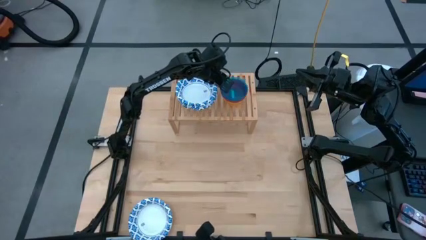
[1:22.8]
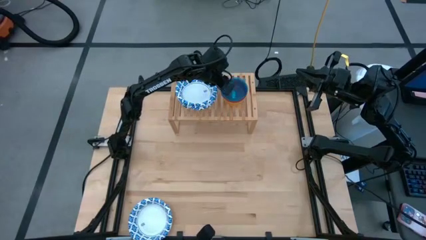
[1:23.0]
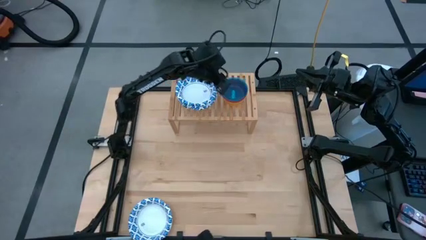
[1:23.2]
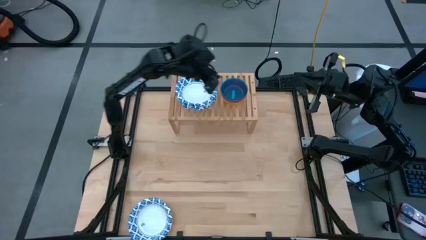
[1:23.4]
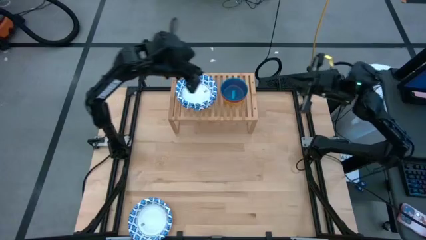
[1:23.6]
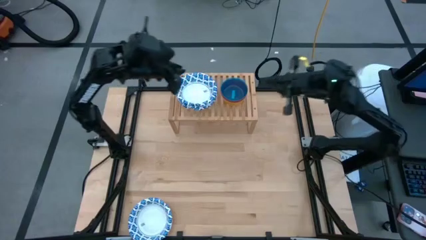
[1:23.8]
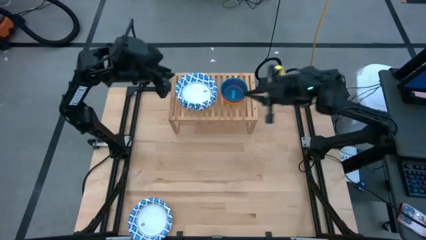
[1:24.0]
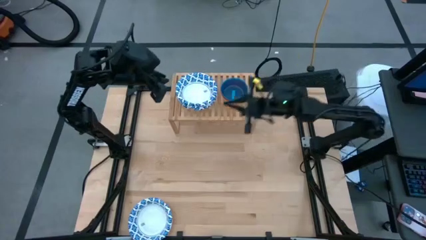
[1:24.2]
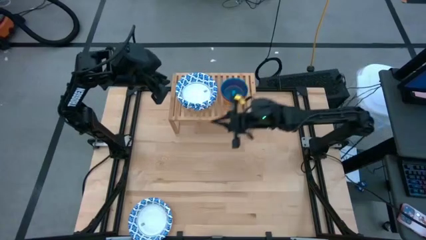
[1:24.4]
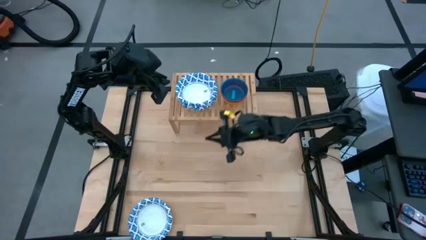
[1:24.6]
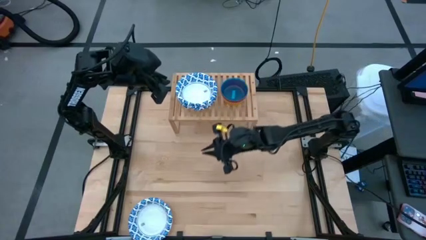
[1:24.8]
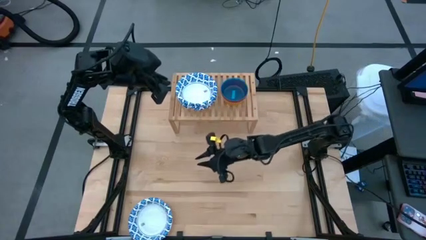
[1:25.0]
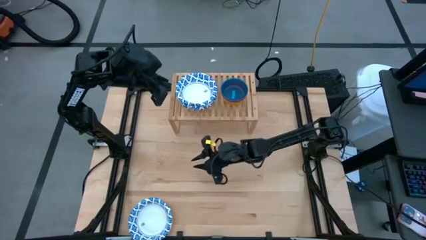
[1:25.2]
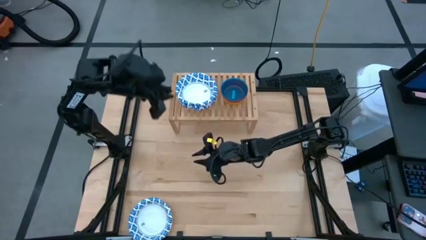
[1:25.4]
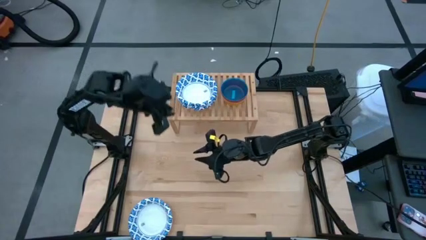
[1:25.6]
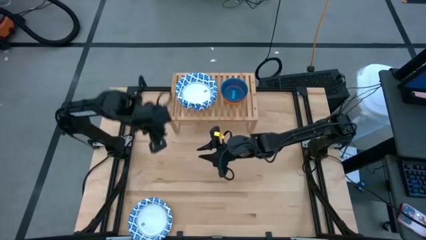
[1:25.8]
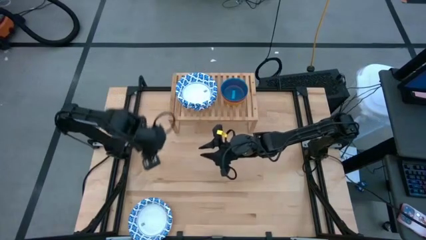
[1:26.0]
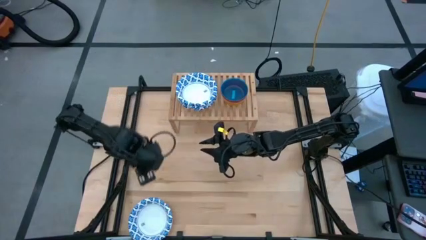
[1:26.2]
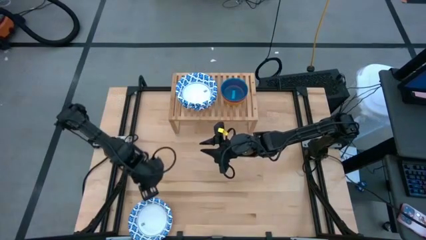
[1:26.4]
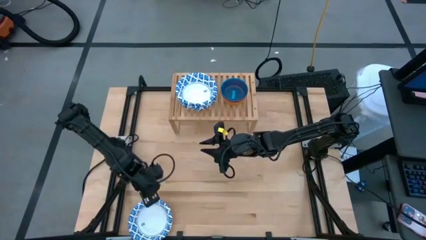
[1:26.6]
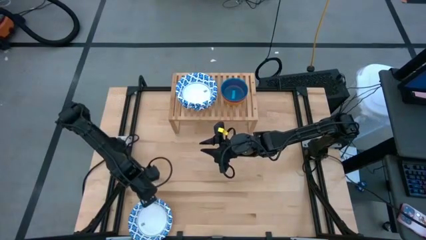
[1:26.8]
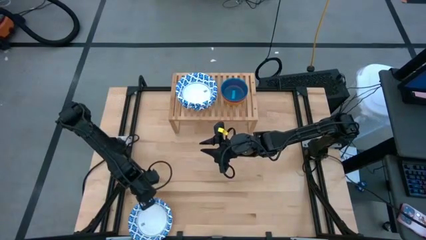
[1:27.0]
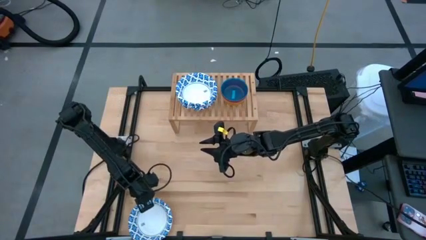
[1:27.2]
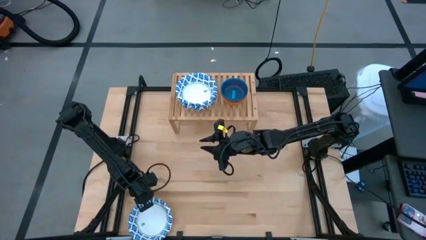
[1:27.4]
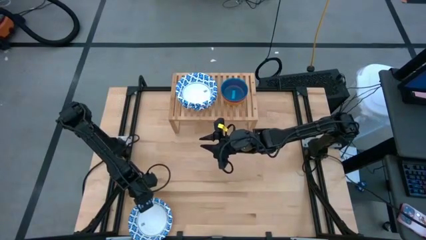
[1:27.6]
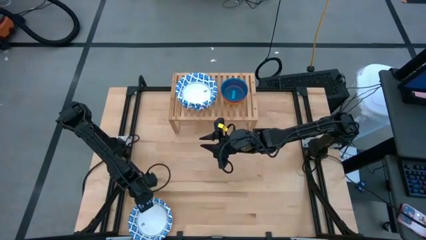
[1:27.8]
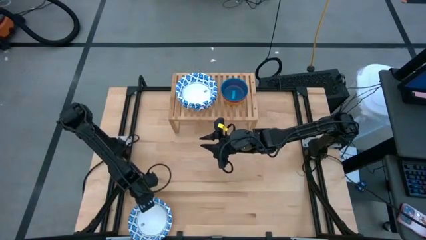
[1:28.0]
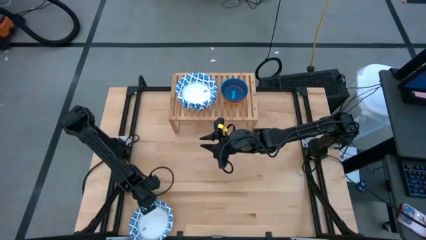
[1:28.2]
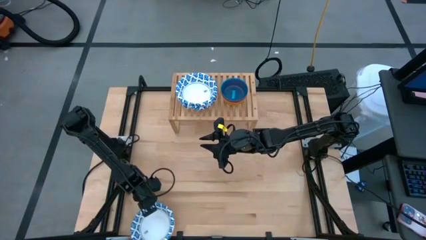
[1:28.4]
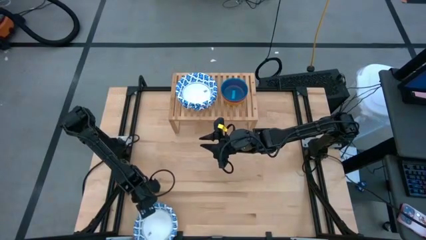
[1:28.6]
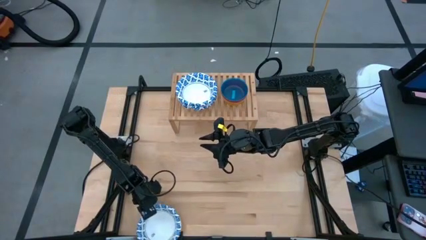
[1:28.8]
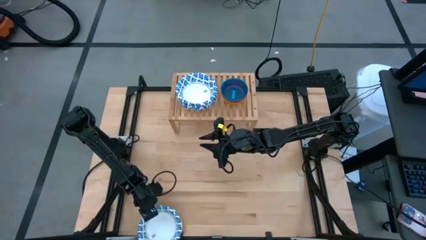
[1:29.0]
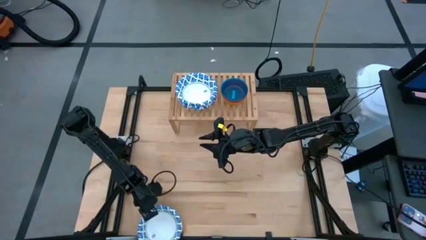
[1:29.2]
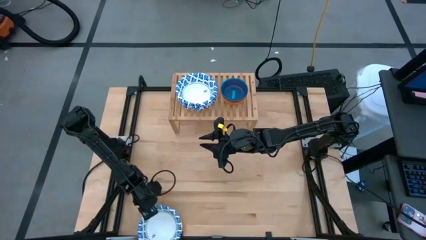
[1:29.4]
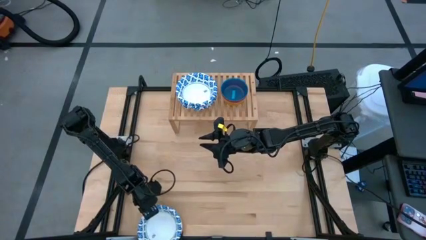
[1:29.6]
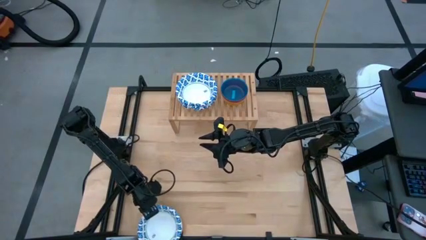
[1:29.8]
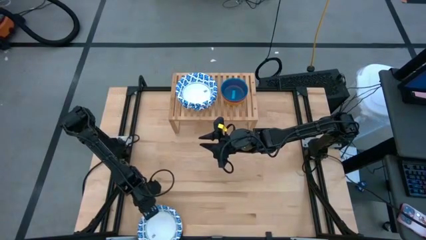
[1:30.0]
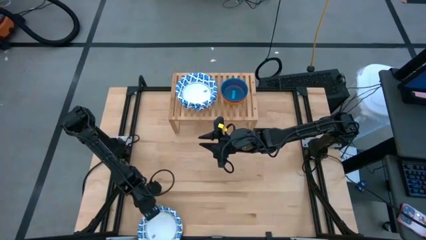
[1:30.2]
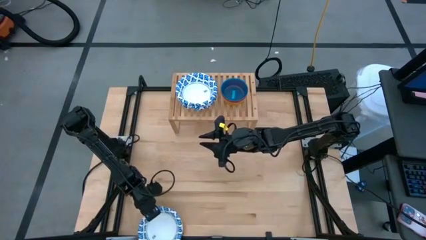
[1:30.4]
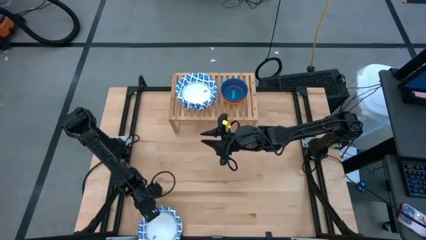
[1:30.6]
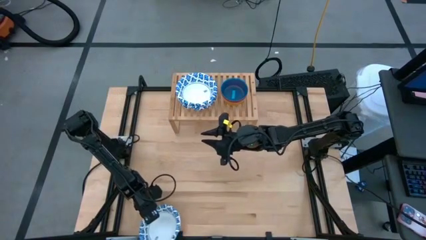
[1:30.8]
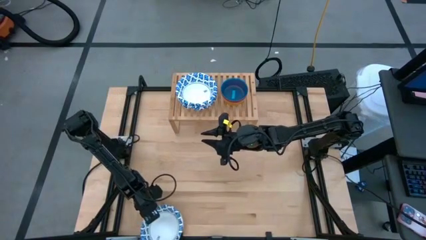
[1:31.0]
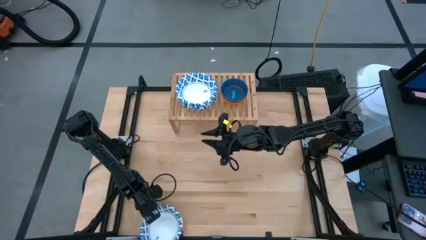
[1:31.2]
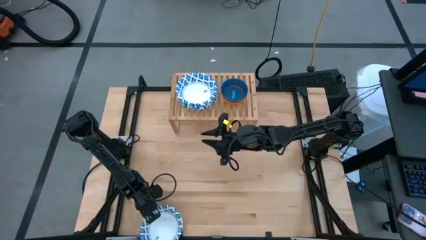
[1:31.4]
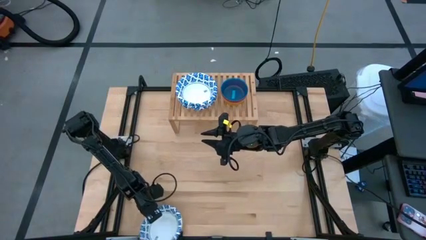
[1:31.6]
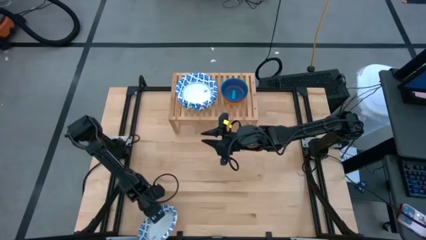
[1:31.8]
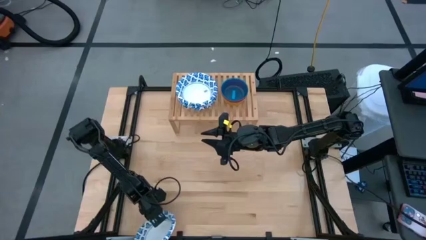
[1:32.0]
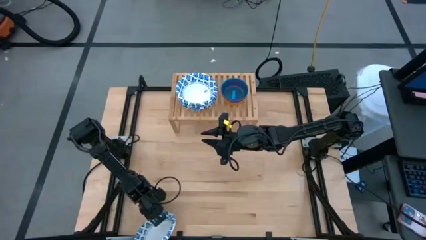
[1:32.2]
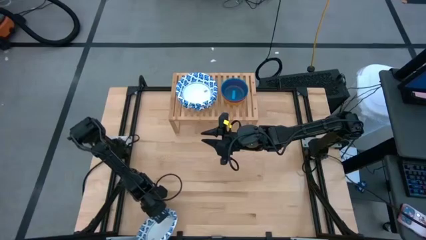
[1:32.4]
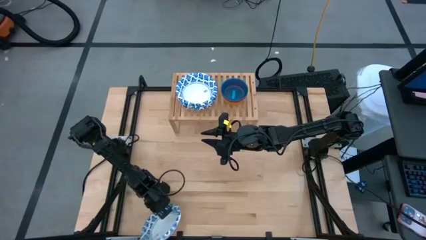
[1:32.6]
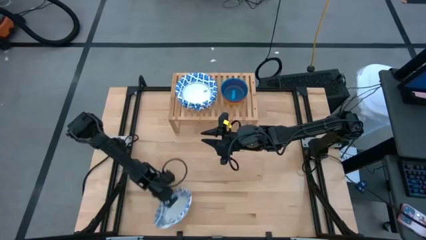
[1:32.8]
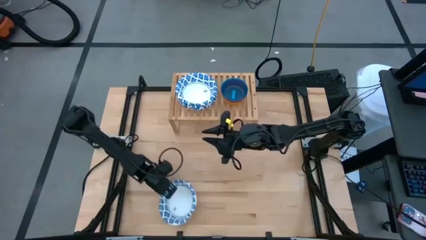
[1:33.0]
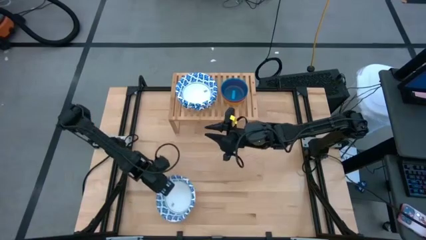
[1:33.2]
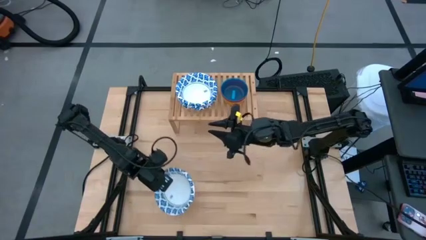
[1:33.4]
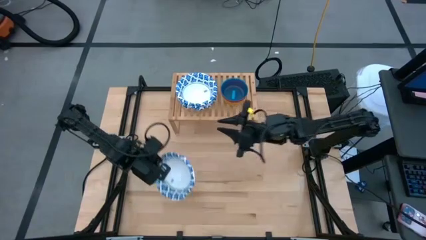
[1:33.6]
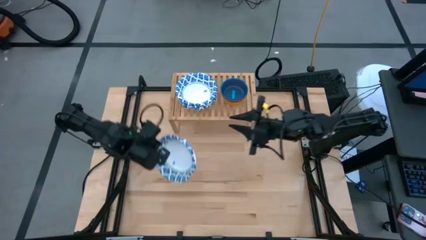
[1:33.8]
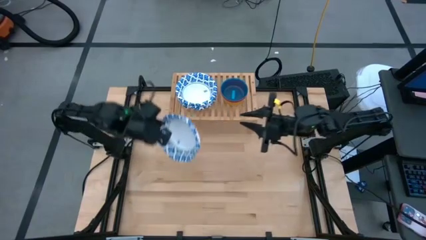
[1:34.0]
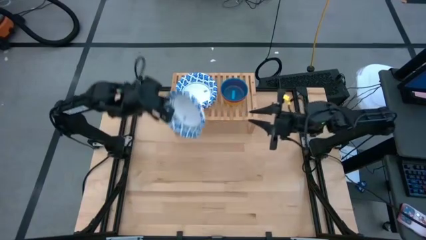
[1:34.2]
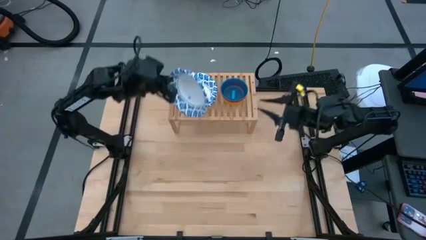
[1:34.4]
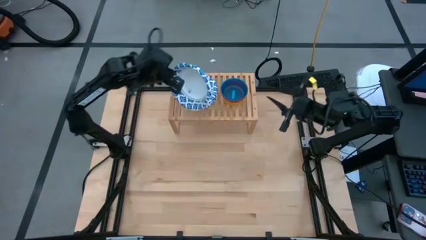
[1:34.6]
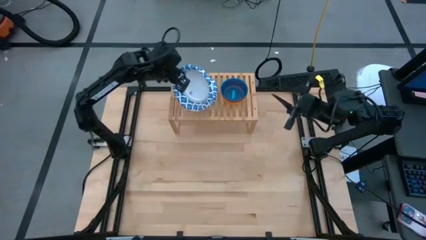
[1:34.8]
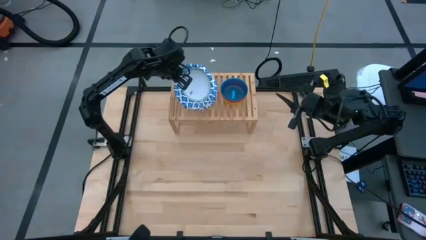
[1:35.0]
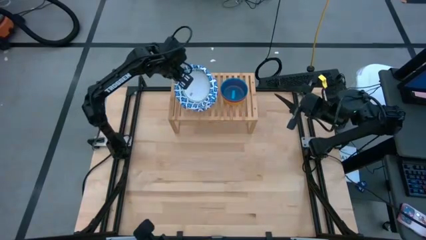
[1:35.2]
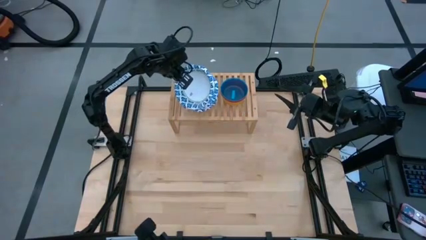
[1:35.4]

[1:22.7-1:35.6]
Task: Place and stack bowls onto a shelf
Stack the white patterned bowl on top of the white patterned bowl on the shelf

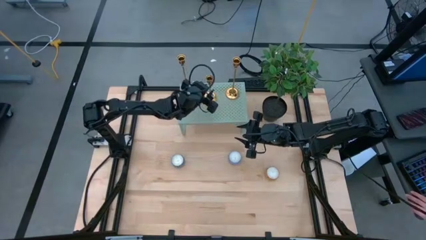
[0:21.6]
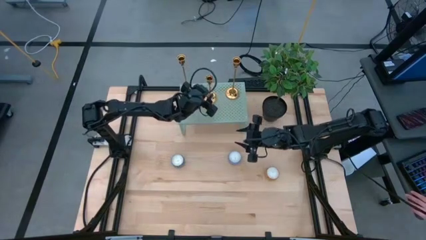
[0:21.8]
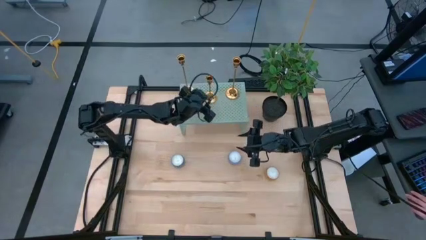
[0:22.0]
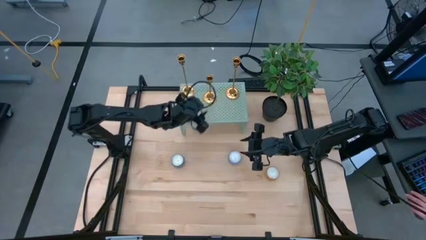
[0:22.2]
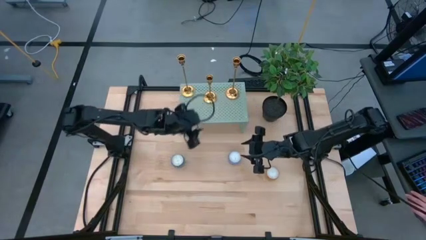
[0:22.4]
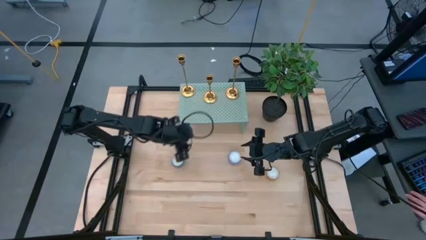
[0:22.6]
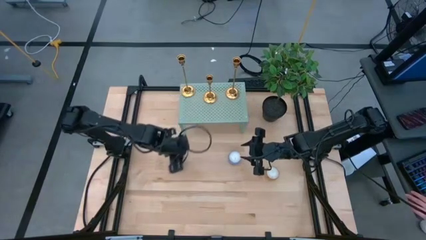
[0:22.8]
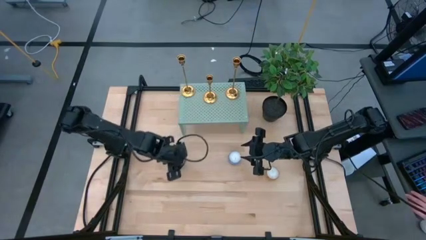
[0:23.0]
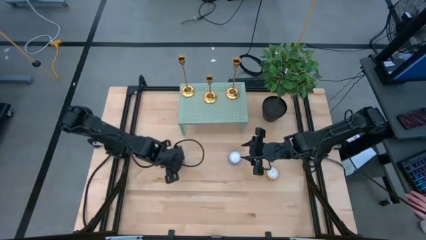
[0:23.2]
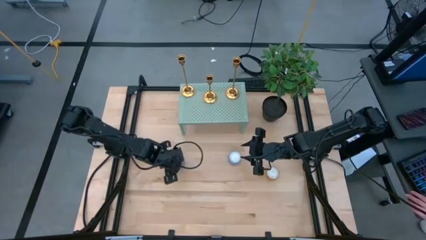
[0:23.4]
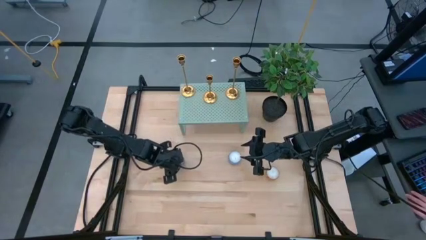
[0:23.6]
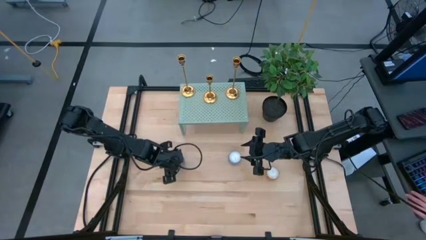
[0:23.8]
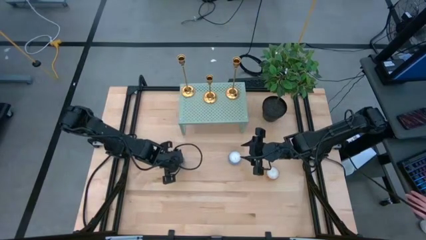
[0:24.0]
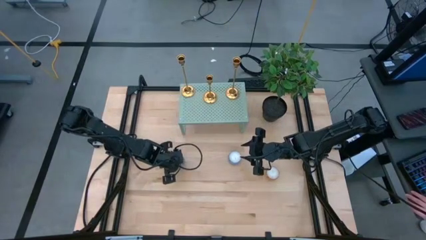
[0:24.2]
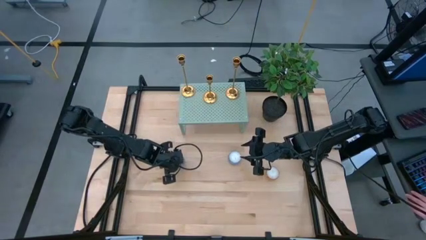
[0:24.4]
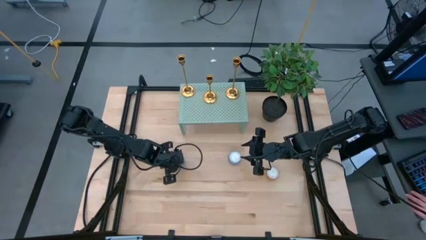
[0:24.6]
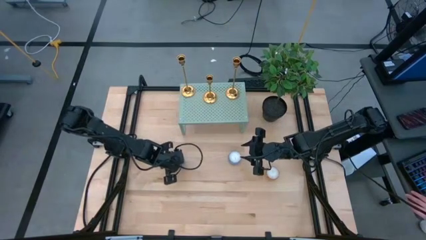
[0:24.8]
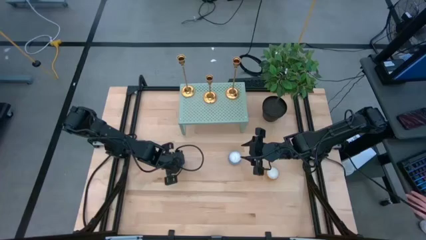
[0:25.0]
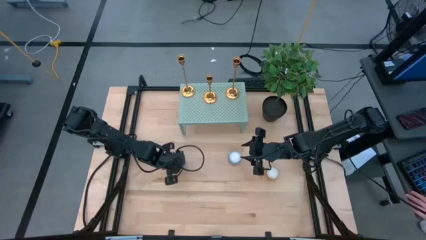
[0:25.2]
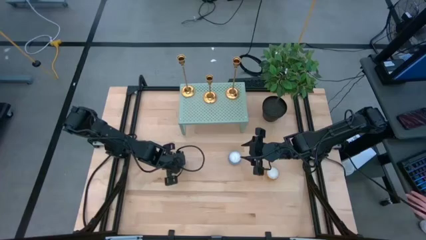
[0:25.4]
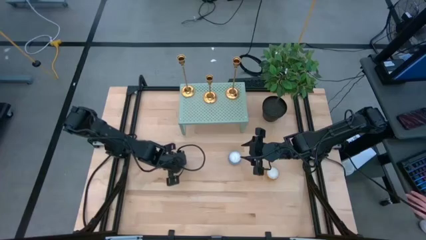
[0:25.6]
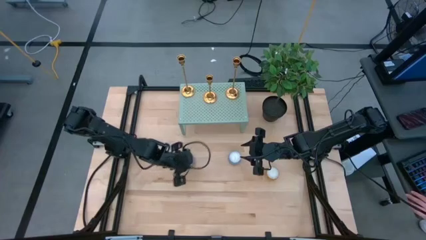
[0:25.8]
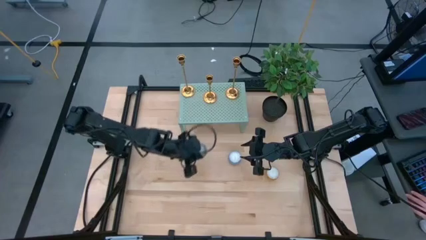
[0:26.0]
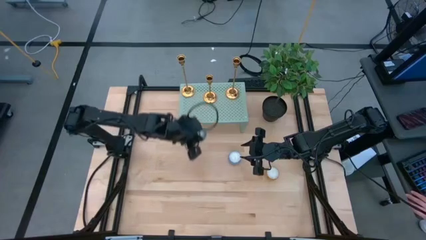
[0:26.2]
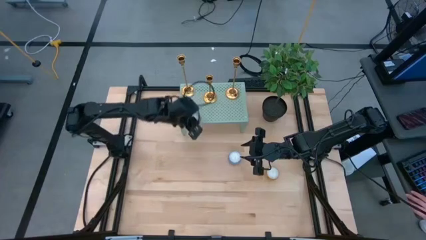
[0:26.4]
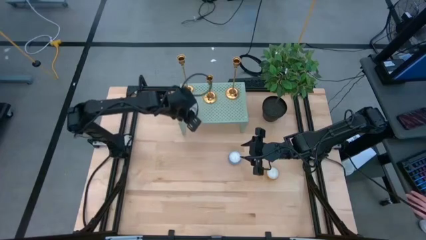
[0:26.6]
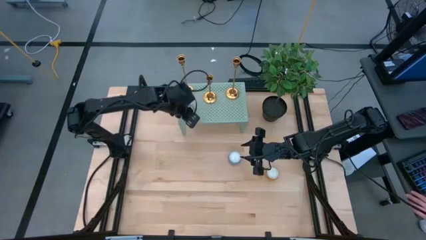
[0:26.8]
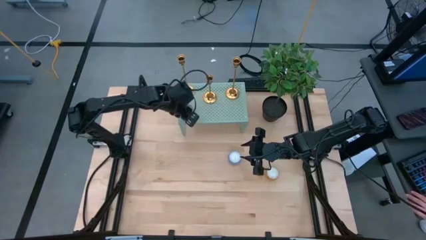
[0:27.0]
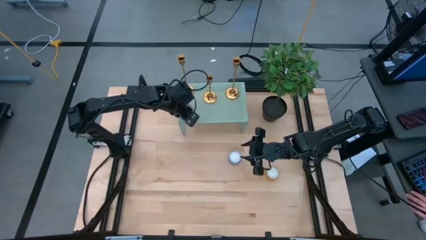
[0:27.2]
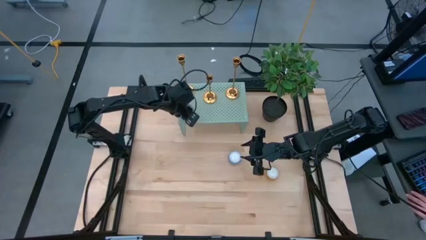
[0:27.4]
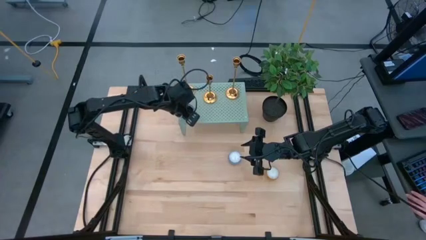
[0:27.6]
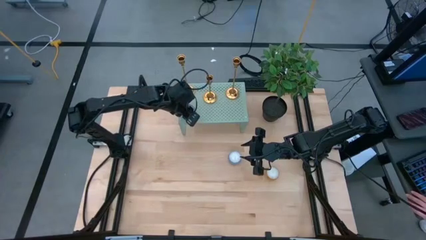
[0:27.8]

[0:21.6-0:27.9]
Task: Pick & Place candle stick holders
Put the left blue scented candle on the shelf
